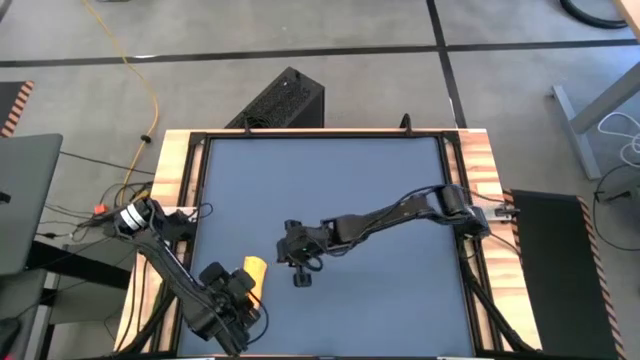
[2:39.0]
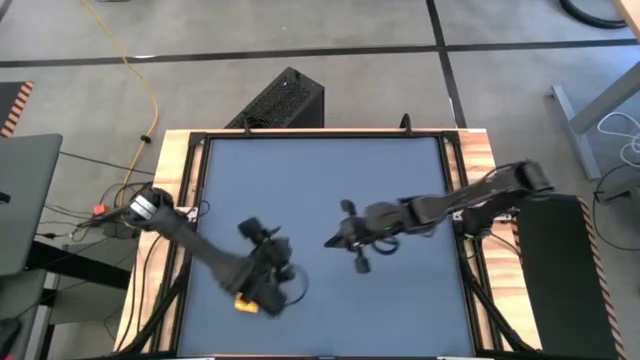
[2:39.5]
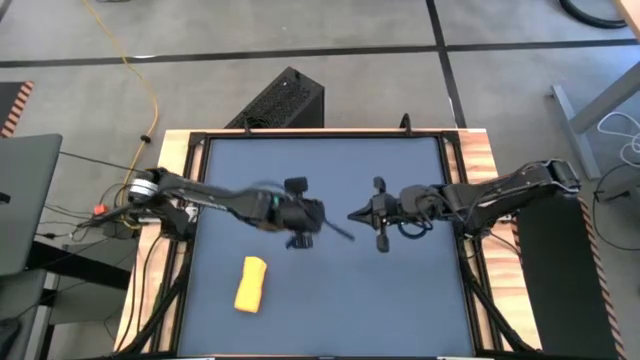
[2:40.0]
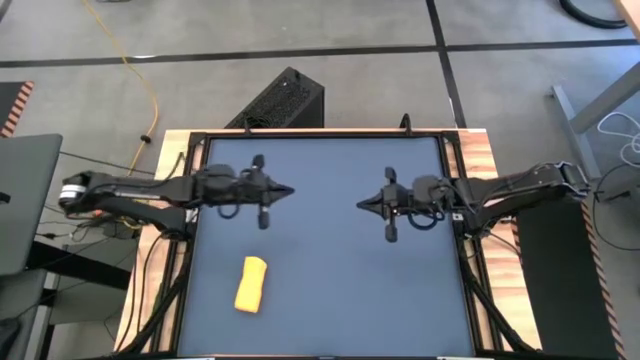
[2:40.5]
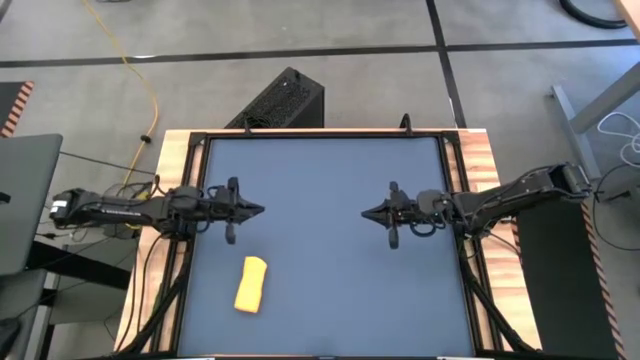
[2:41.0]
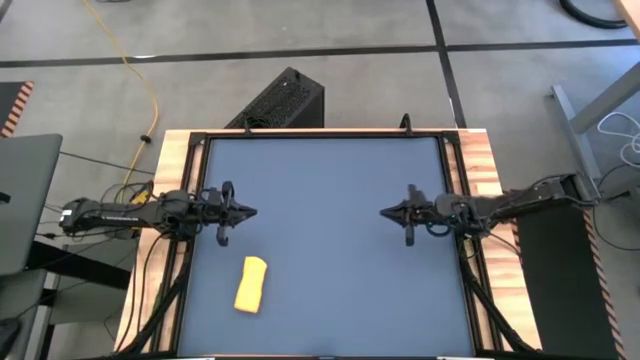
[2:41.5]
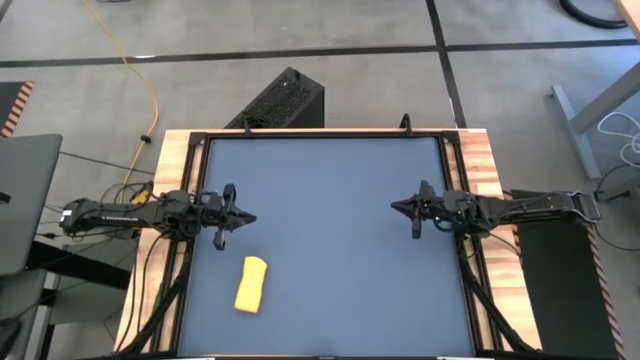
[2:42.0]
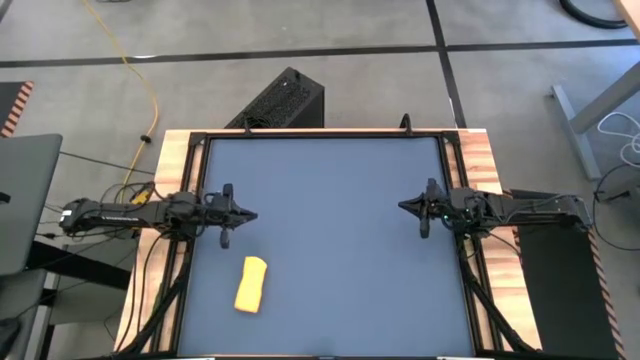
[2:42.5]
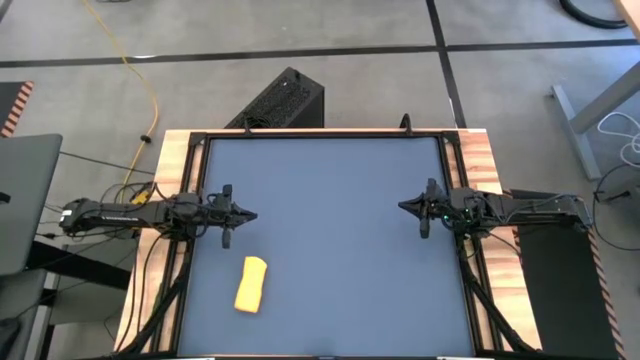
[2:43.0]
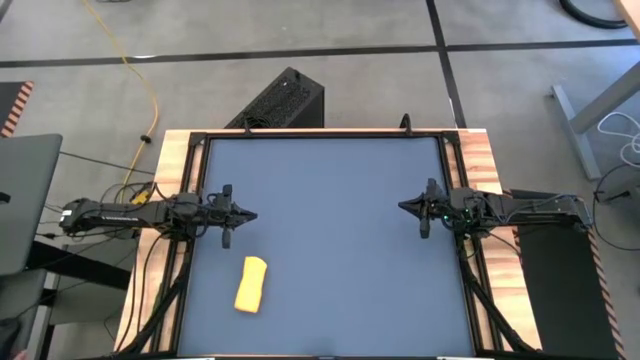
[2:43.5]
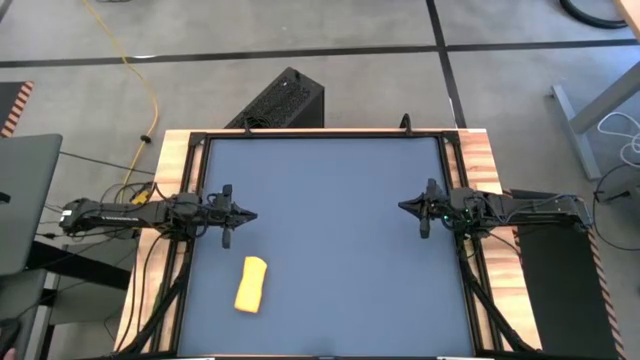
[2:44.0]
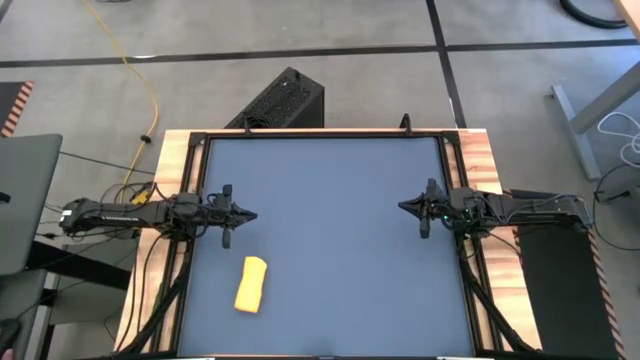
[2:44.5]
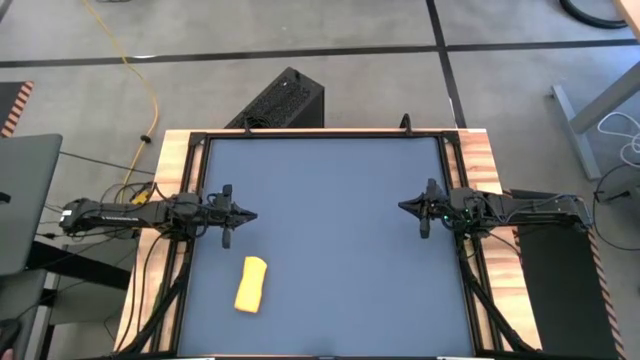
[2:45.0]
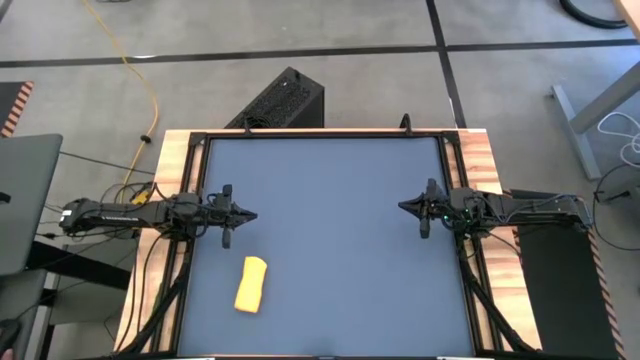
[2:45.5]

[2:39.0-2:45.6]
Task: Roll towel into tight, uniform cylinder
Return to Home Position

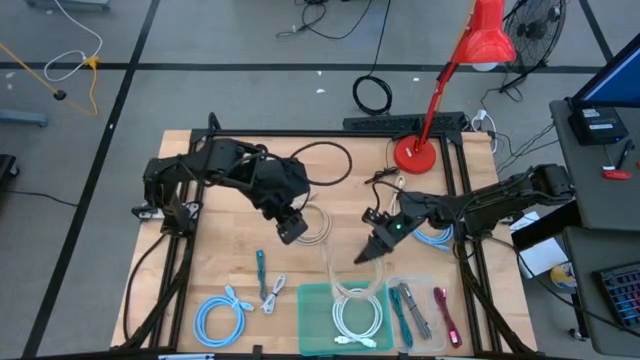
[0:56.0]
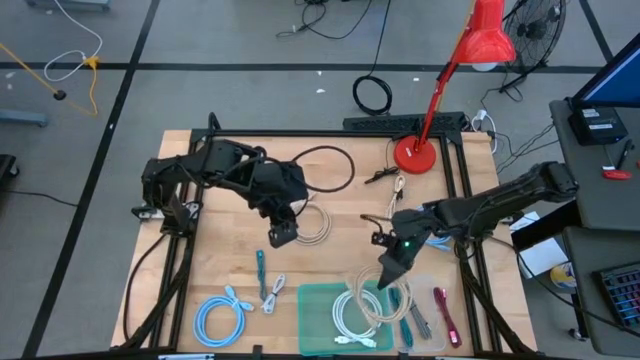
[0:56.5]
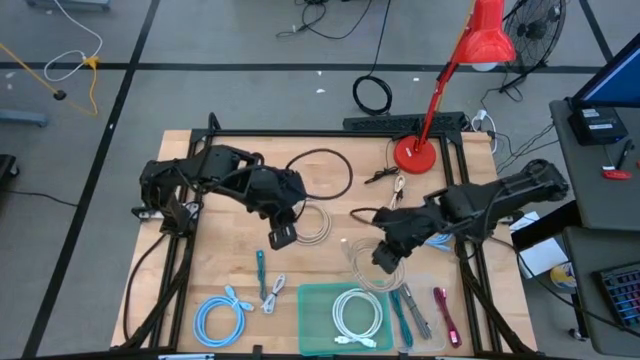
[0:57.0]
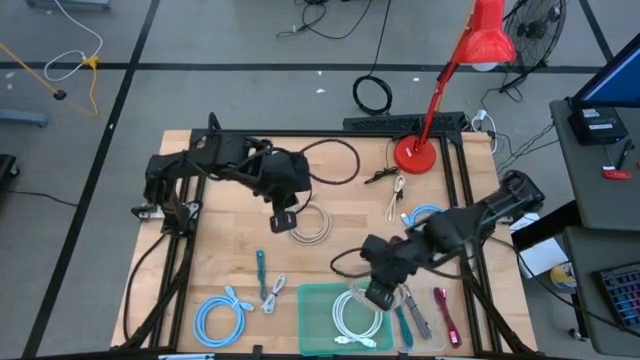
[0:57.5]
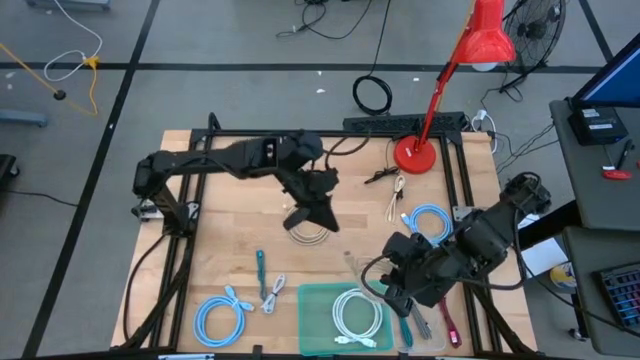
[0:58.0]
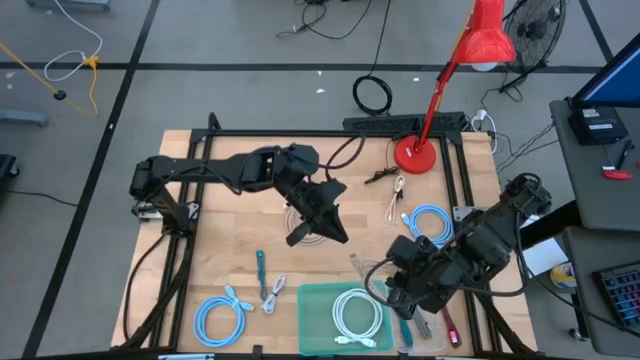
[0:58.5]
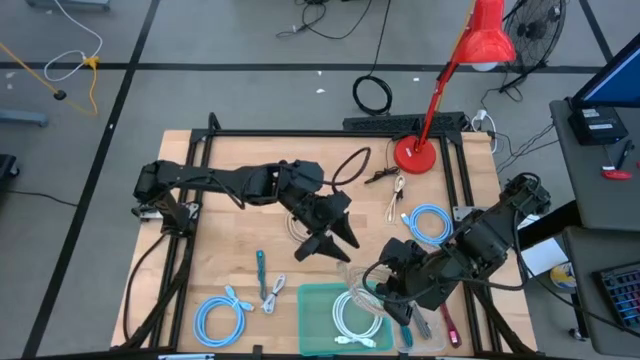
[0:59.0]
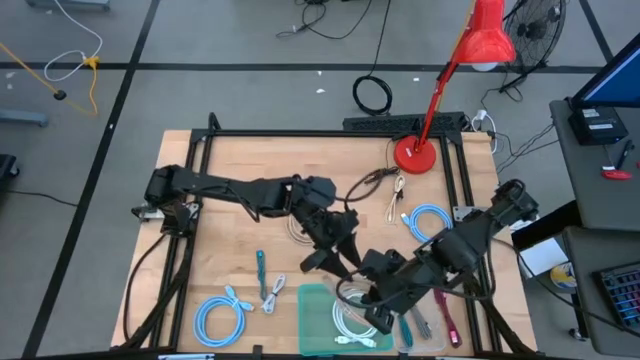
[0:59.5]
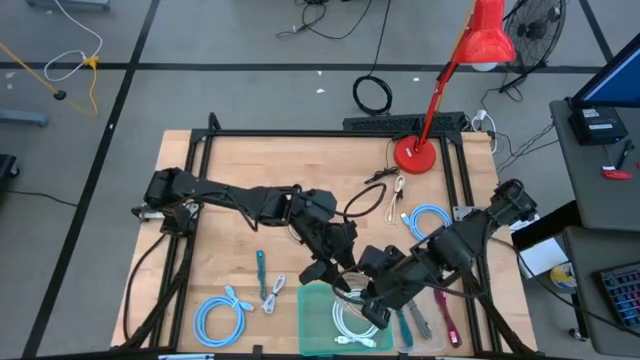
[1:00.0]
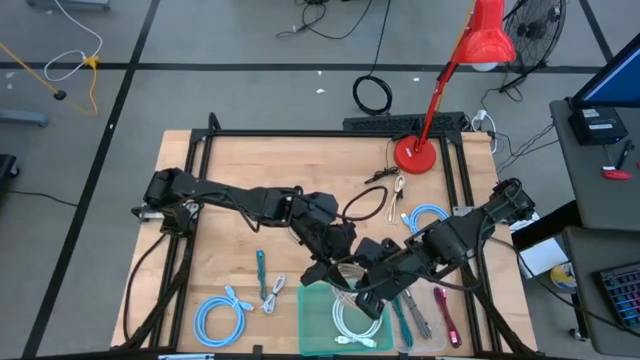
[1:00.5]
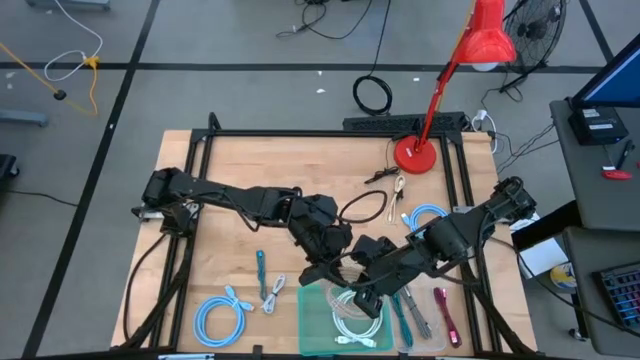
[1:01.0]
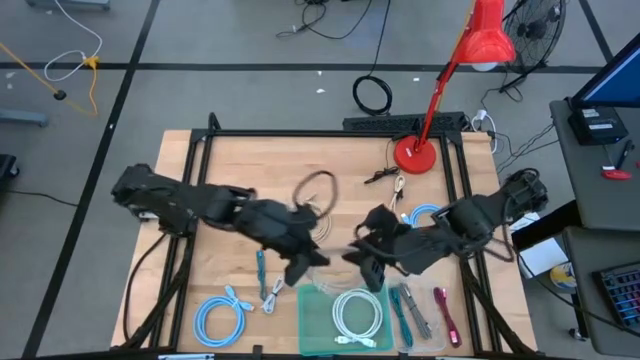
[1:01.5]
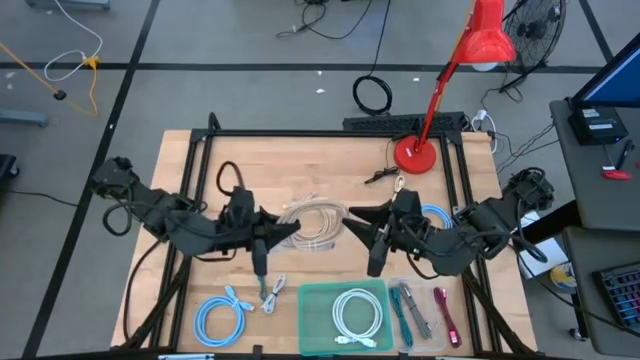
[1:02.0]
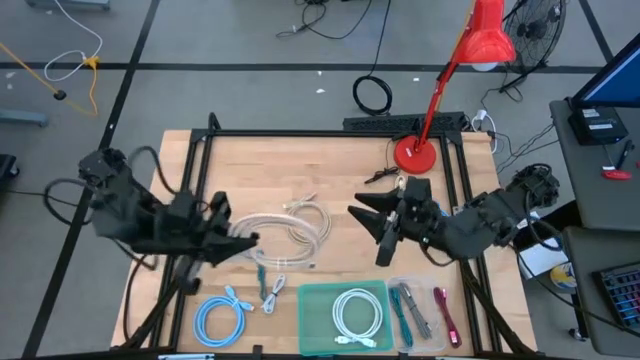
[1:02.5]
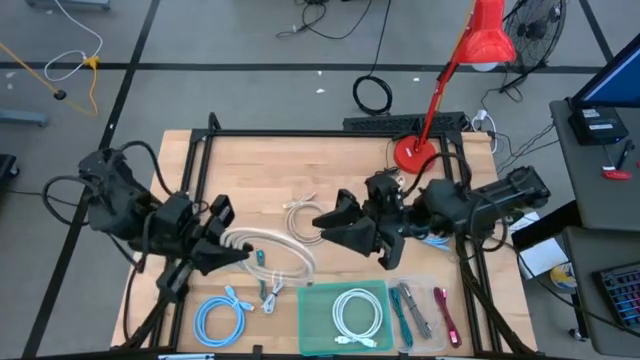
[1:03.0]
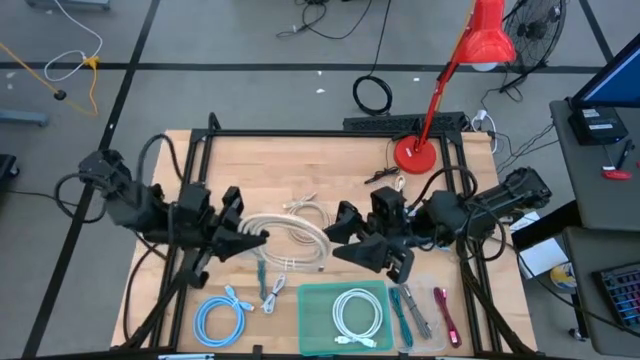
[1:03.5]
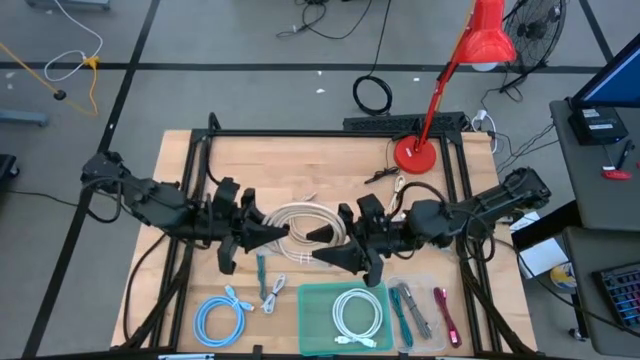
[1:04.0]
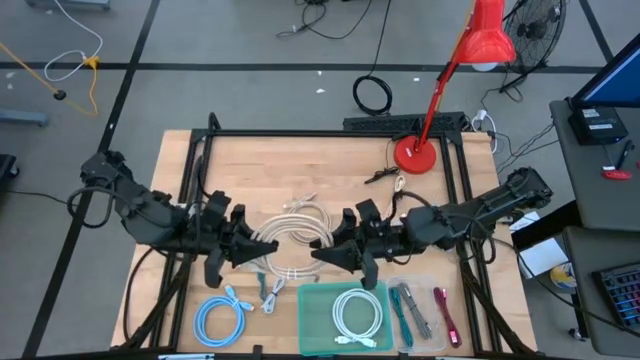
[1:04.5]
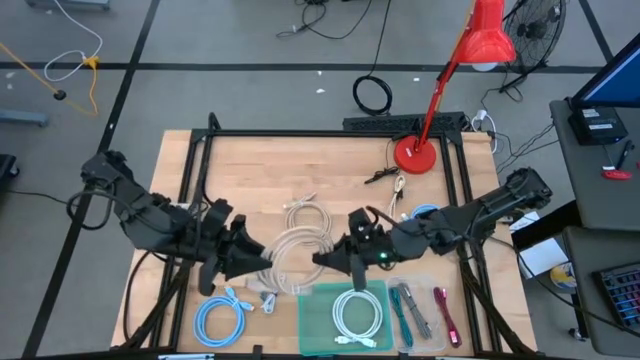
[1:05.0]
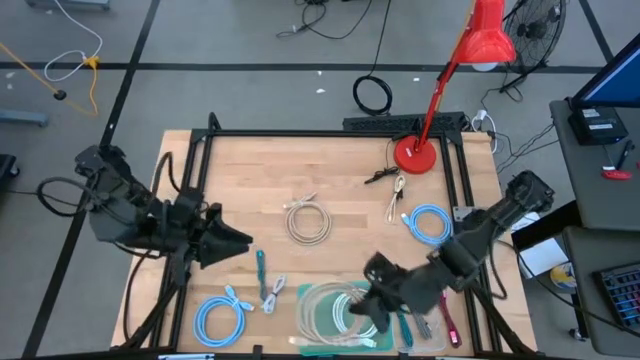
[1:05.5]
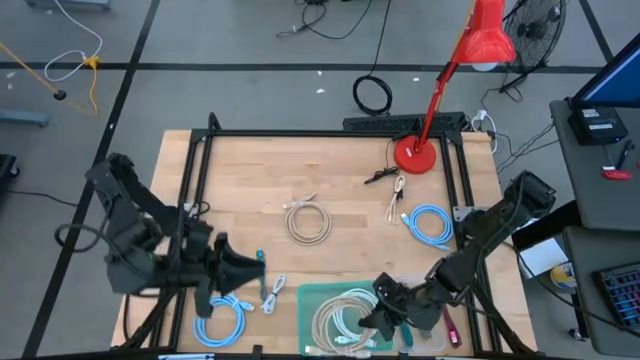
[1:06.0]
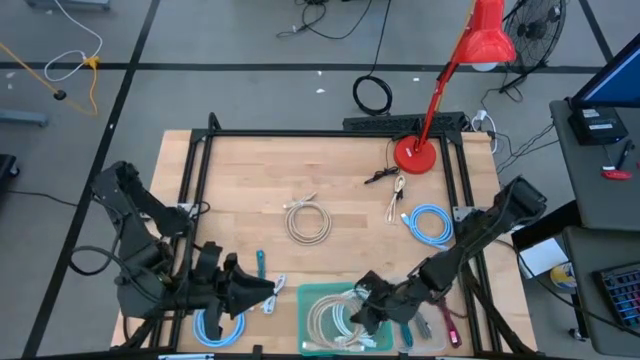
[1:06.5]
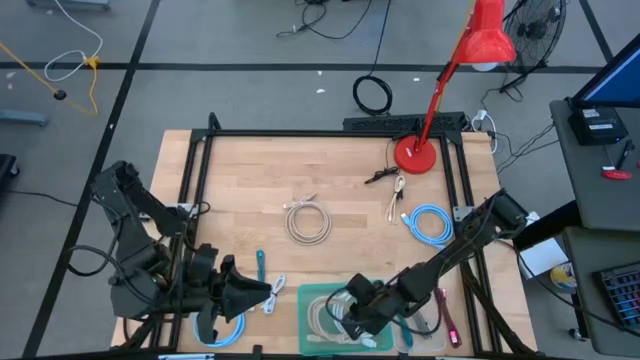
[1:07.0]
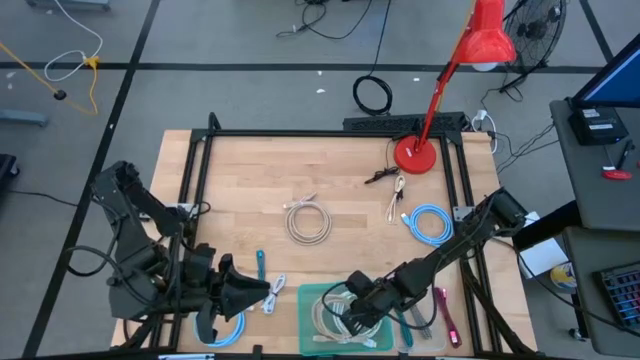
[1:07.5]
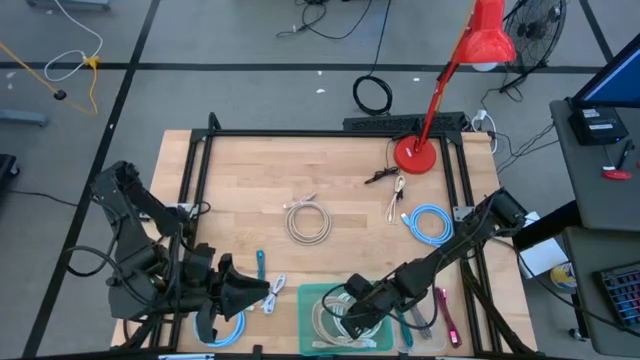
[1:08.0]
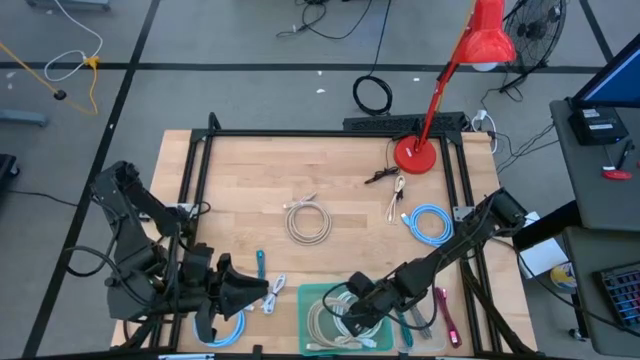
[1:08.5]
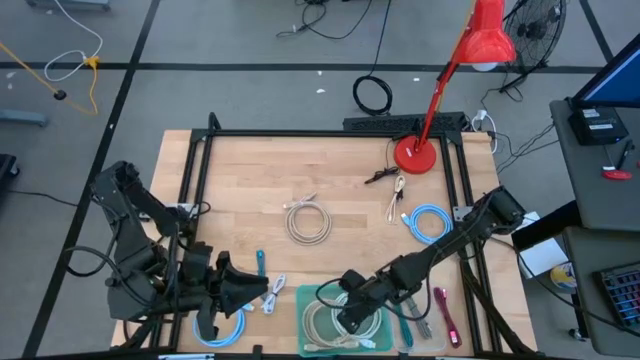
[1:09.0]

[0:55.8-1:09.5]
Task: Pick & Place USB Port
Put the left brown hdmi cable into the green bin
